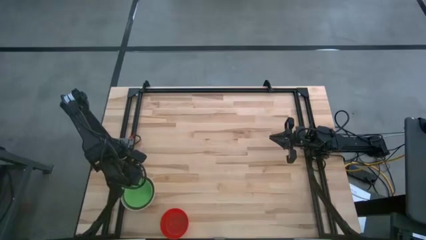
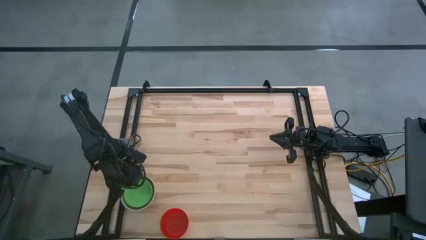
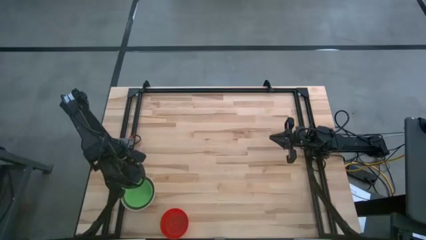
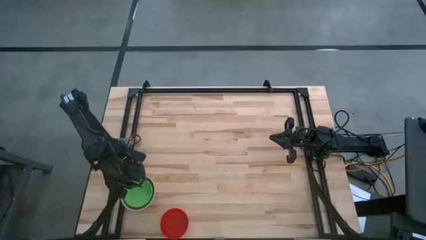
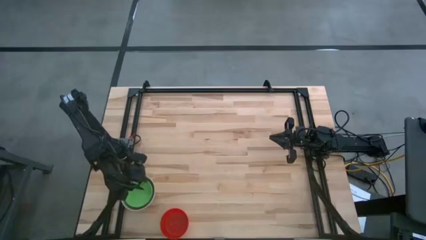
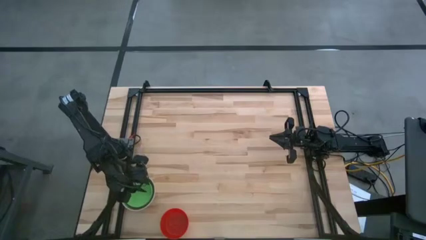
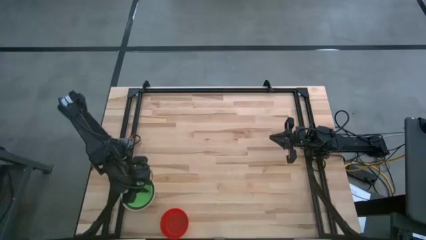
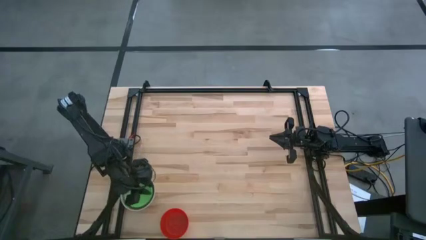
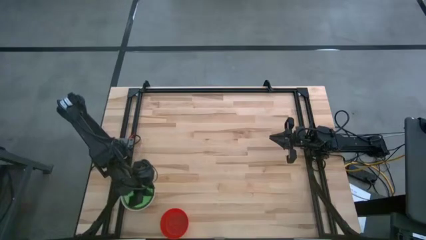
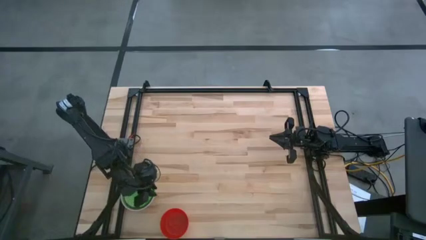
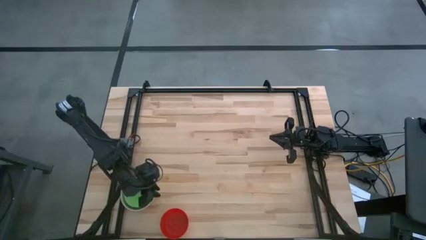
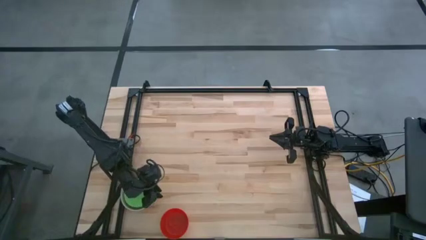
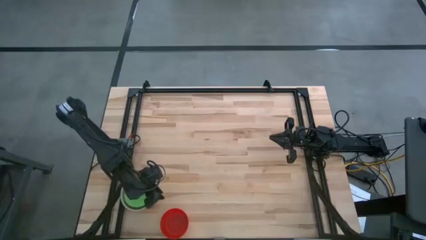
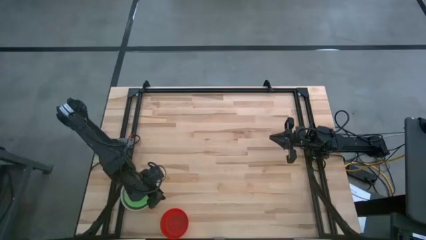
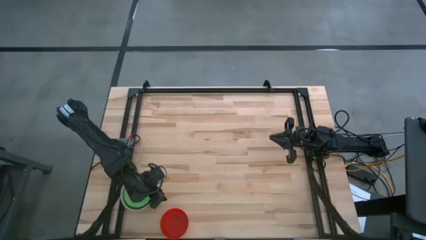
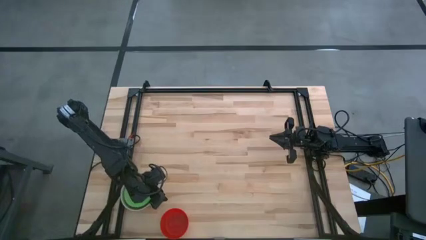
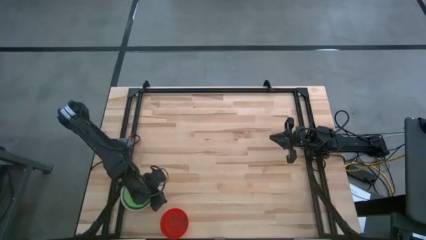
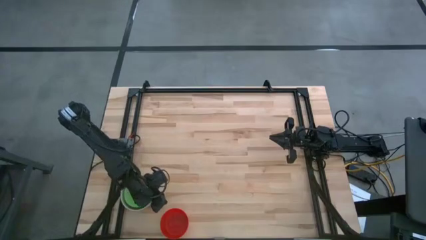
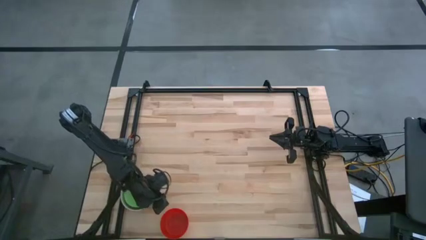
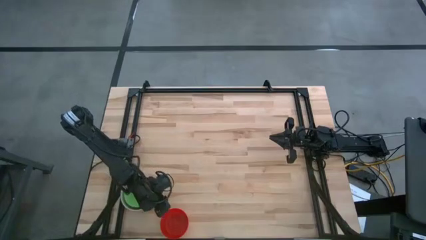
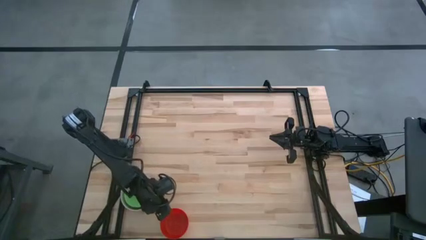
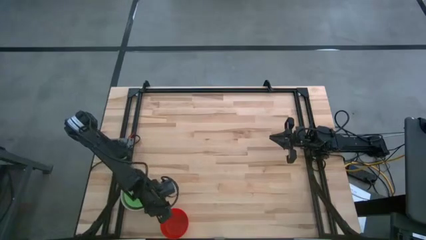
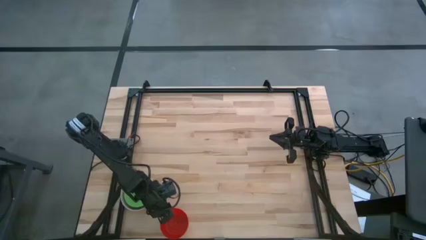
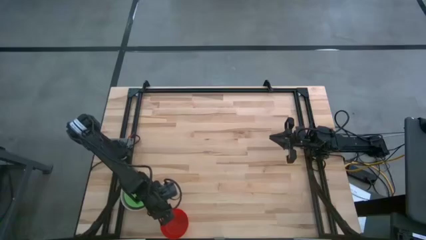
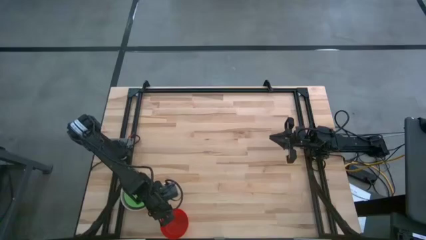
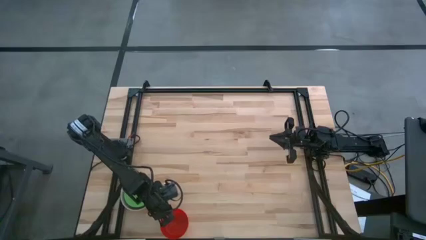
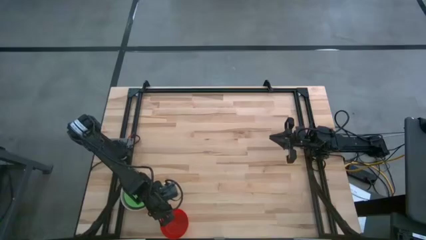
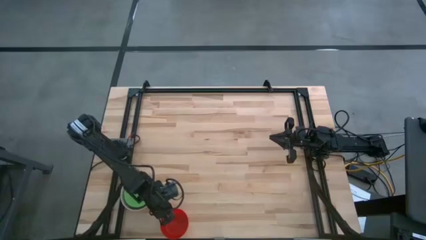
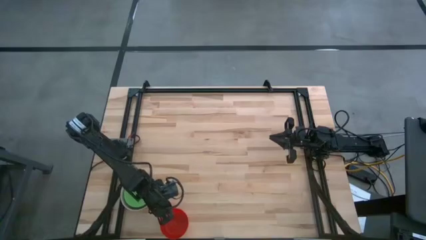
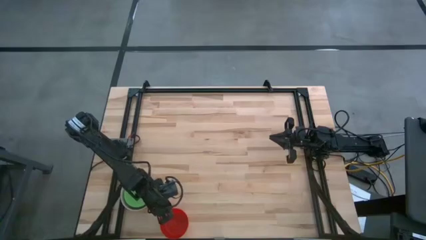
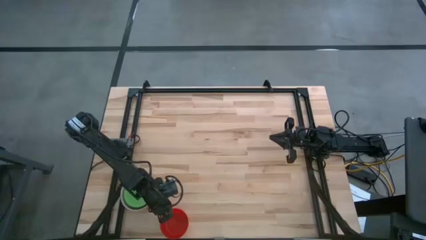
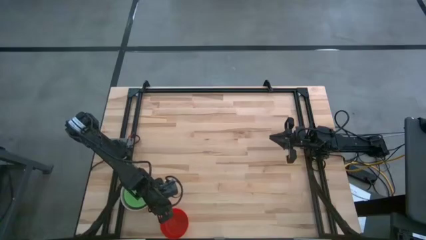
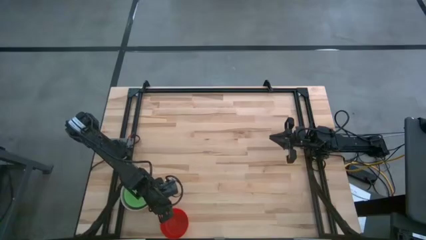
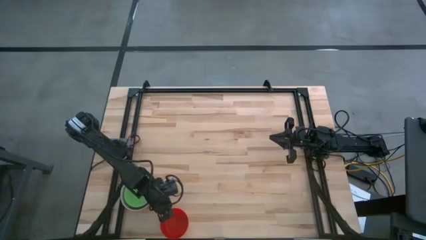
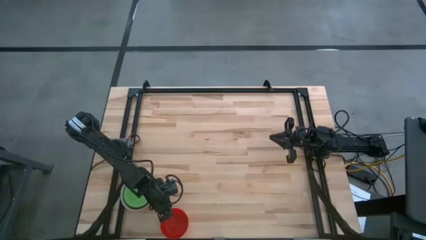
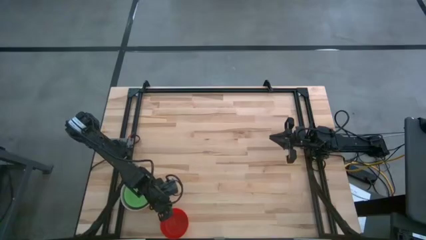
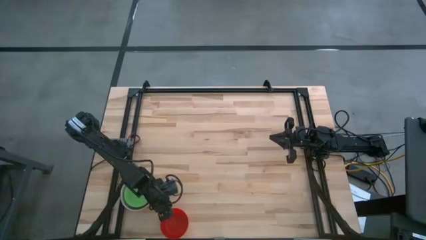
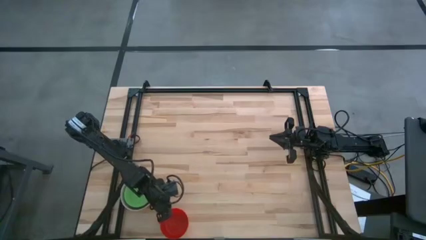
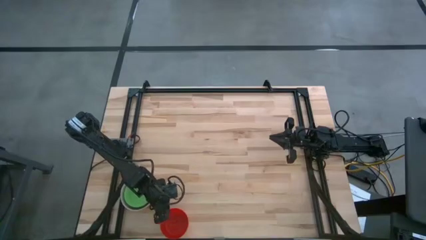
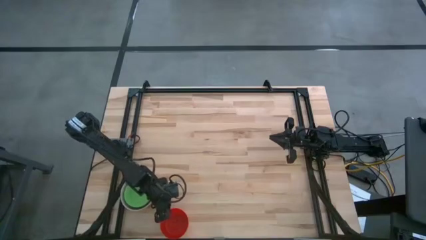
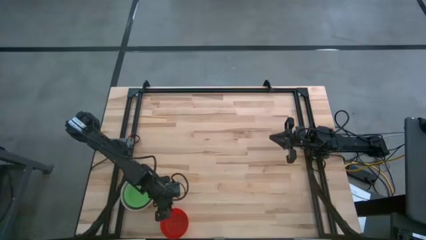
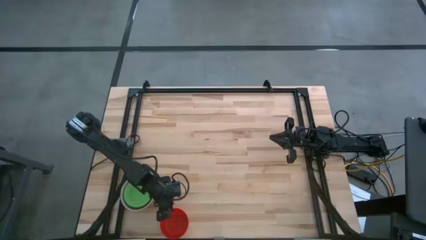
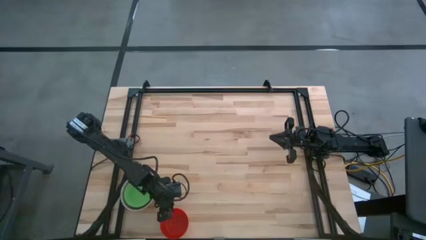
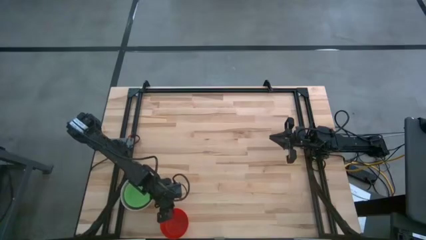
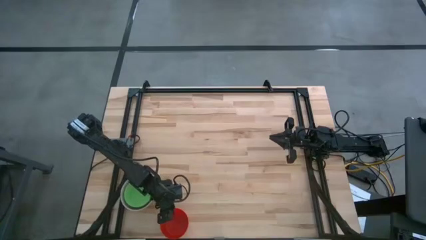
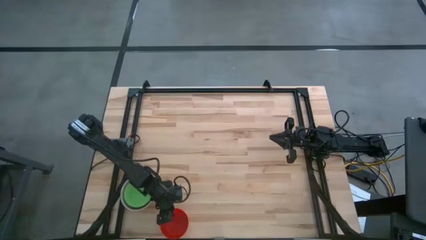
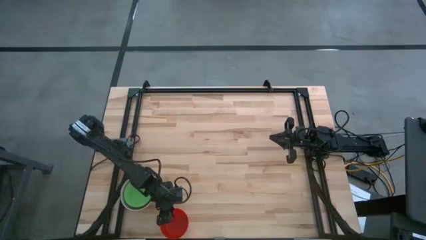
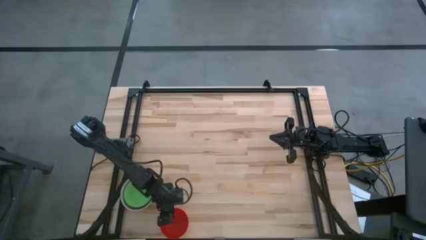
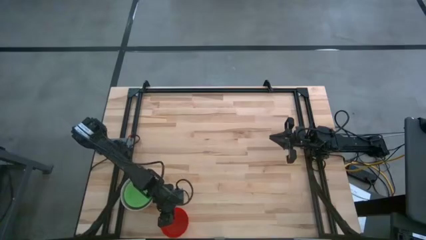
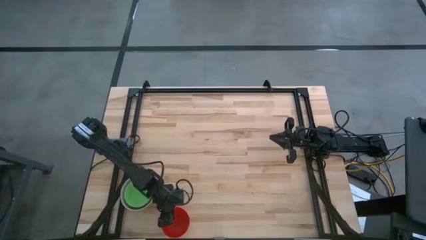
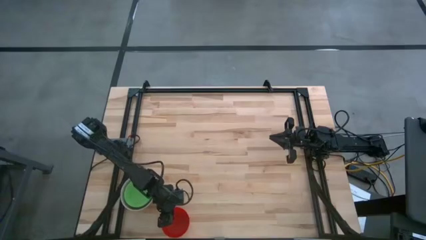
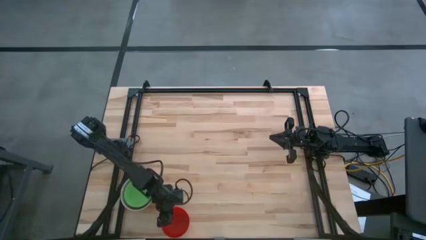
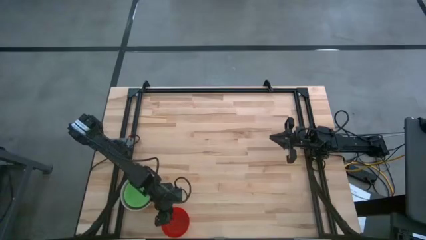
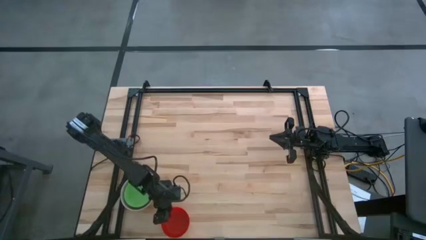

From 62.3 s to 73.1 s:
Stack the red bowl on the green bowl
